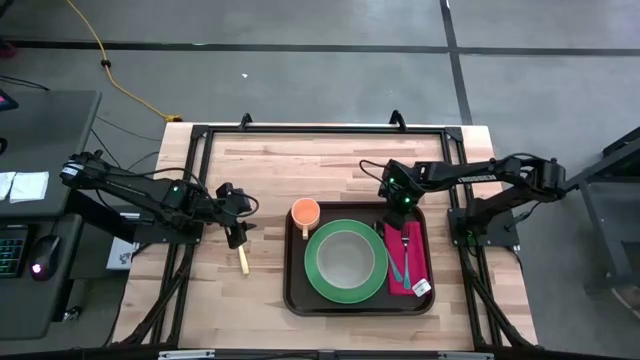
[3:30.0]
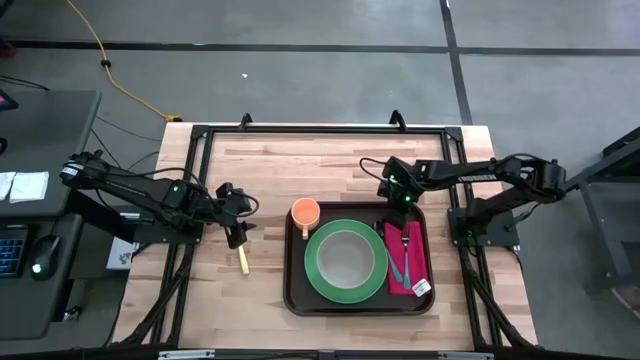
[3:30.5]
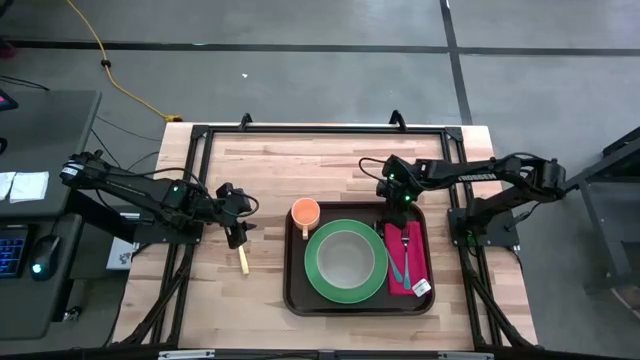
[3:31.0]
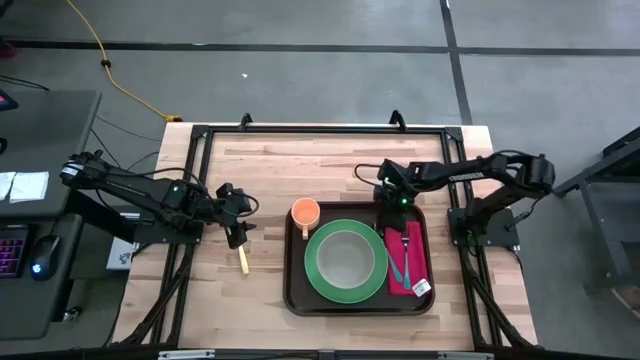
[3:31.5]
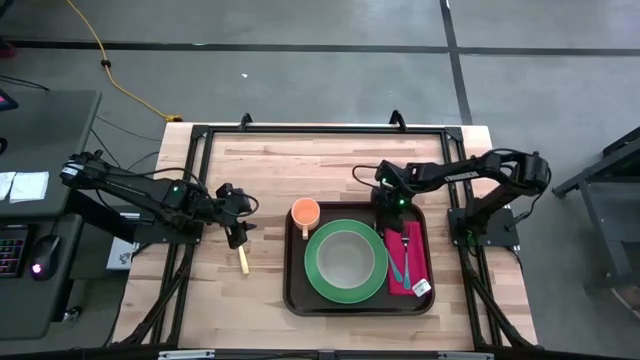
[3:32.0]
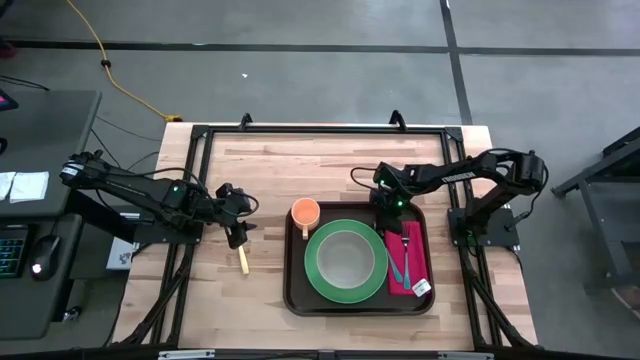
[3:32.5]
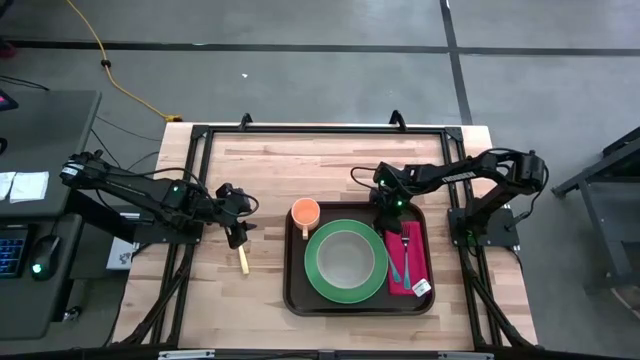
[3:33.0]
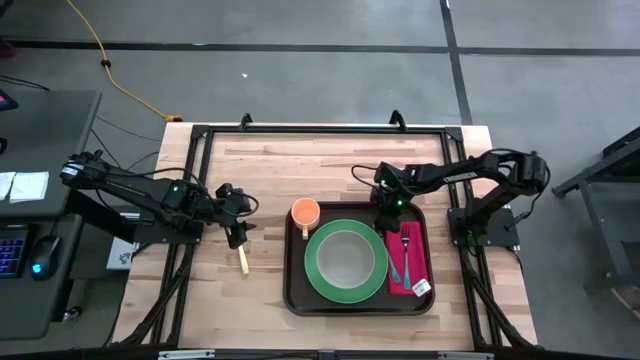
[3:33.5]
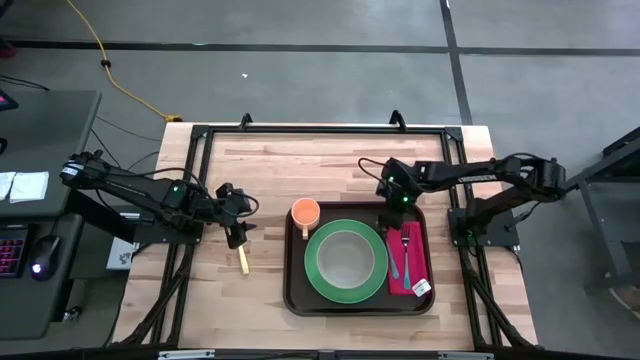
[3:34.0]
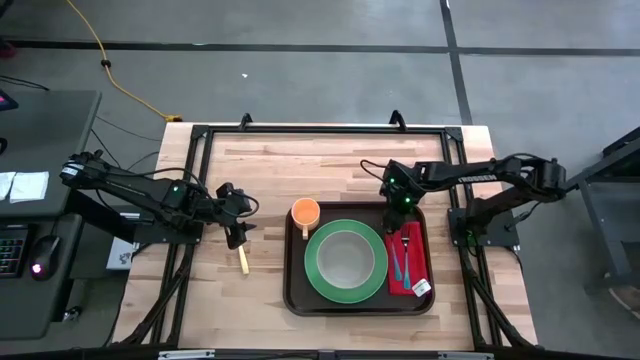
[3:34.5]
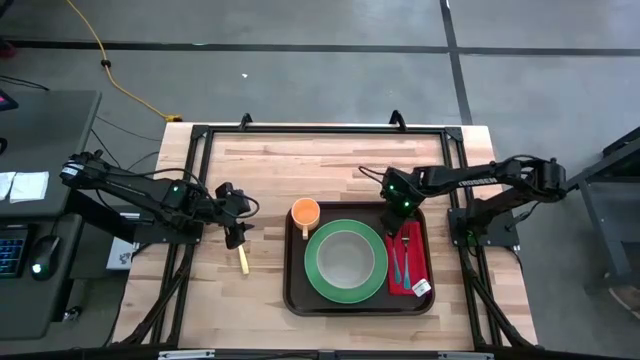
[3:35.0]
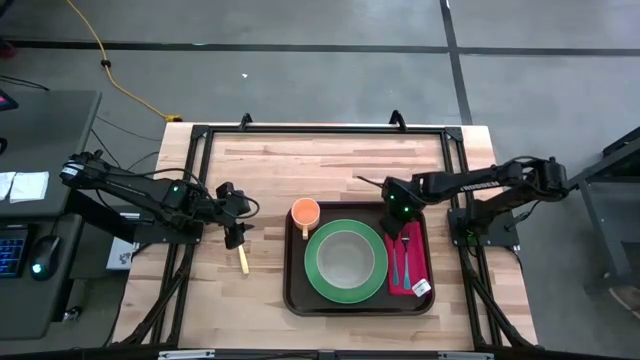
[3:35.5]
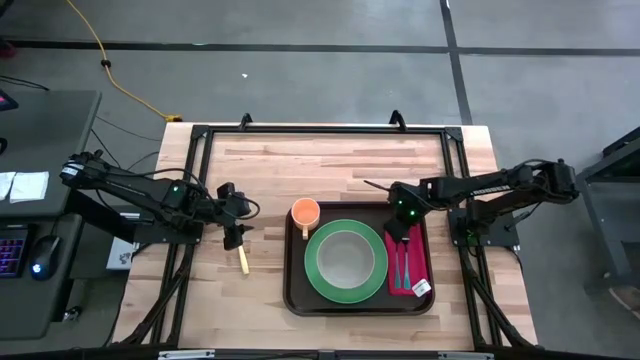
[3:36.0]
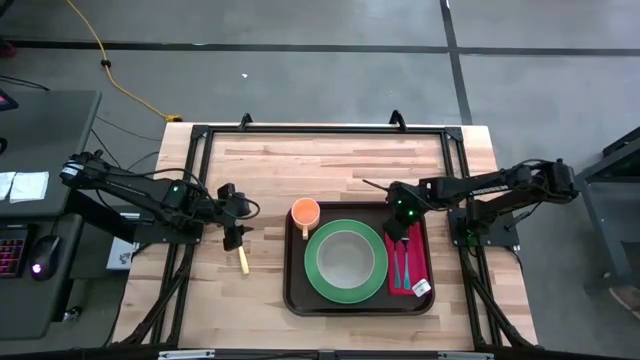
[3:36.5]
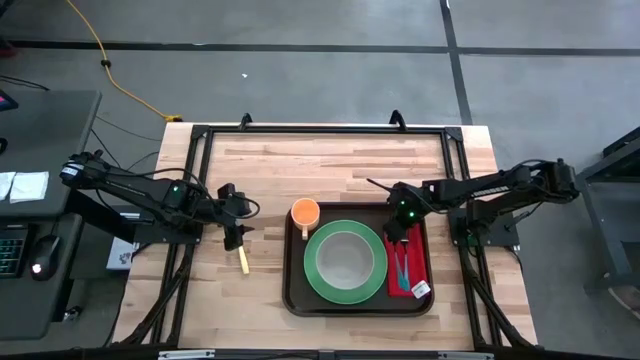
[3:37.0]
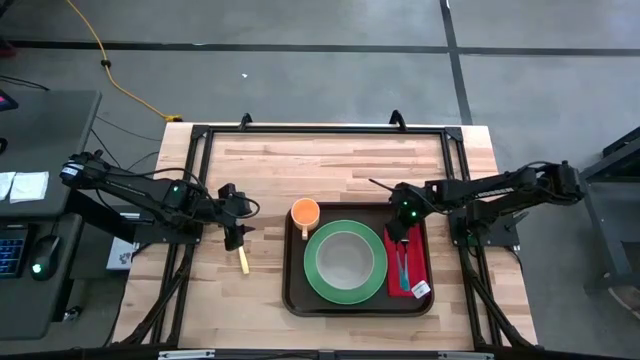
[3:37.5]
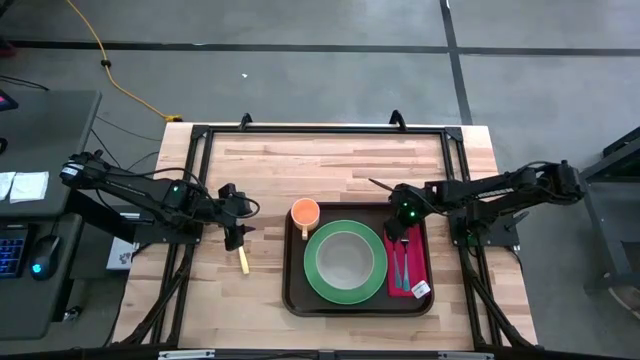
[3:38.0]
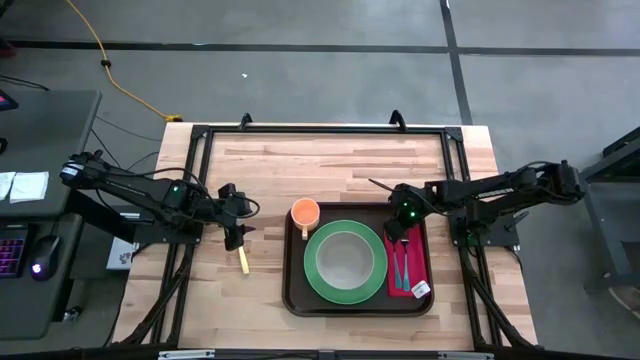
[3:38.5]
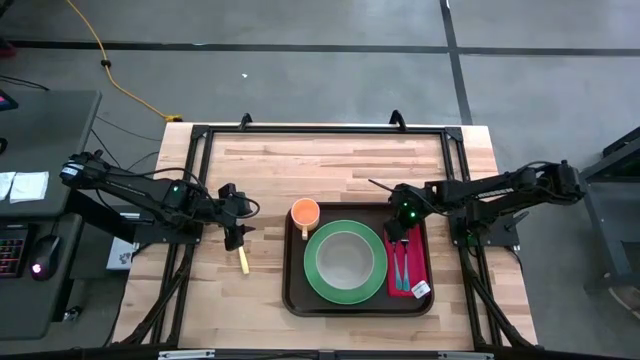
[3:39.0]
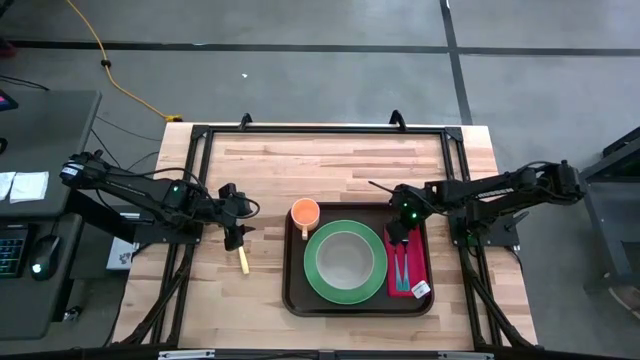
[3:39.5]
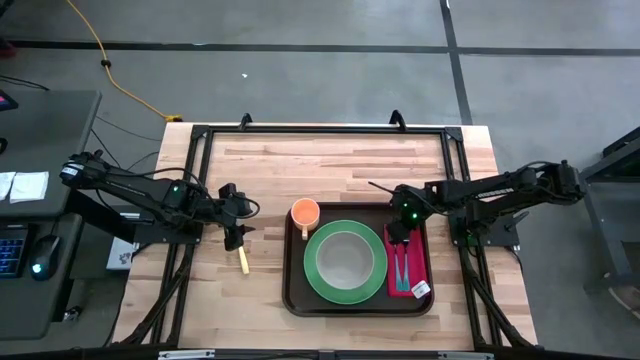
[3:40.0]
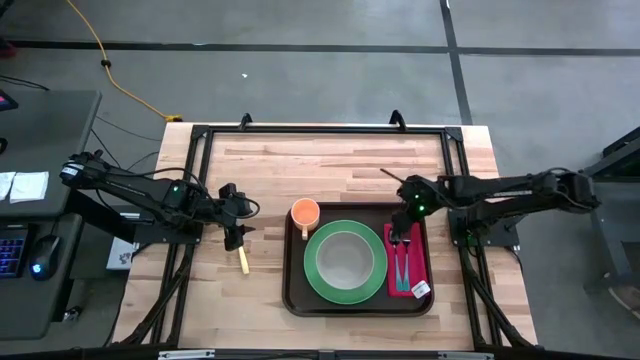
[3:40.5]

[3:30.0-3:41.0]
Task: Set up tray
Put the blue spoon to the left of the blue fork on the red napkin

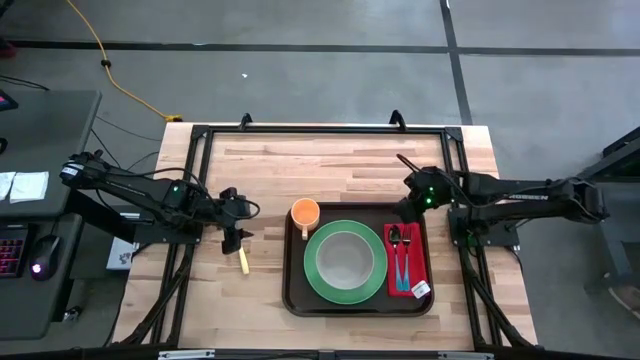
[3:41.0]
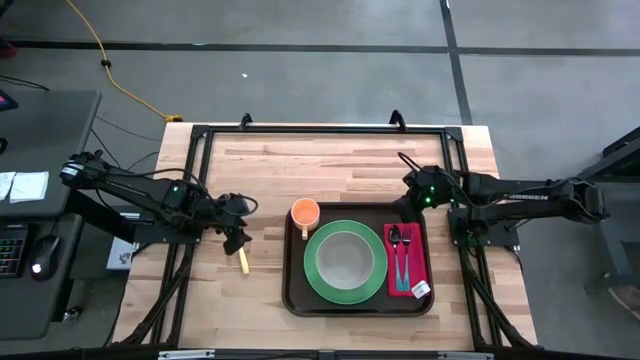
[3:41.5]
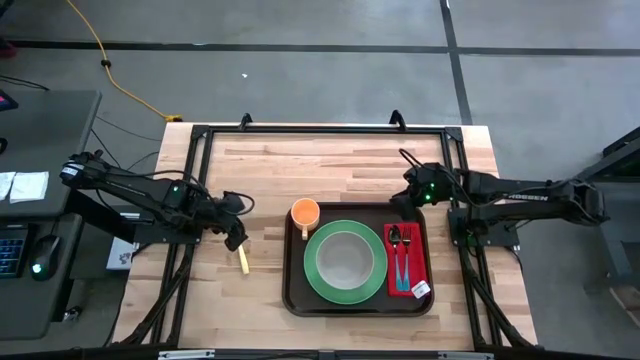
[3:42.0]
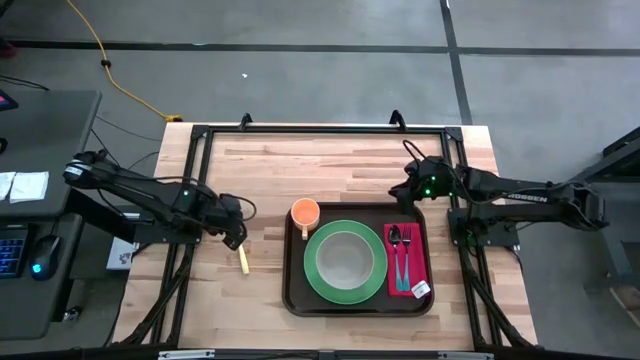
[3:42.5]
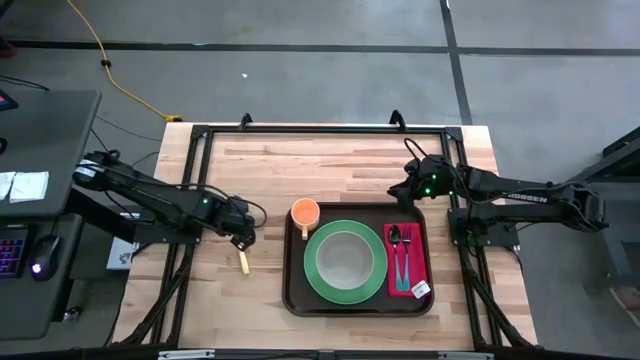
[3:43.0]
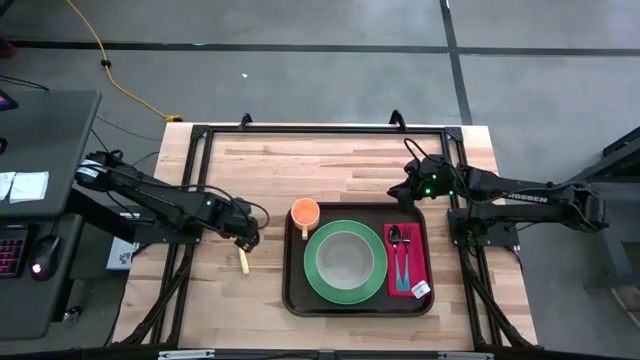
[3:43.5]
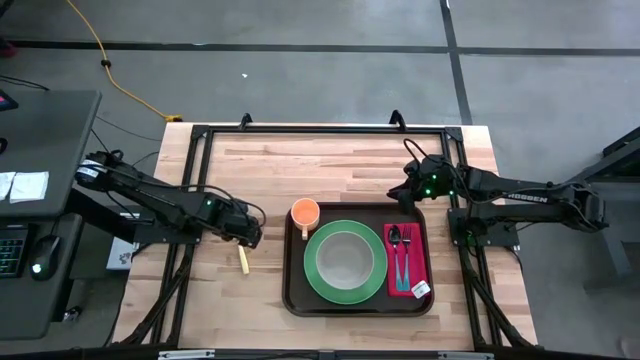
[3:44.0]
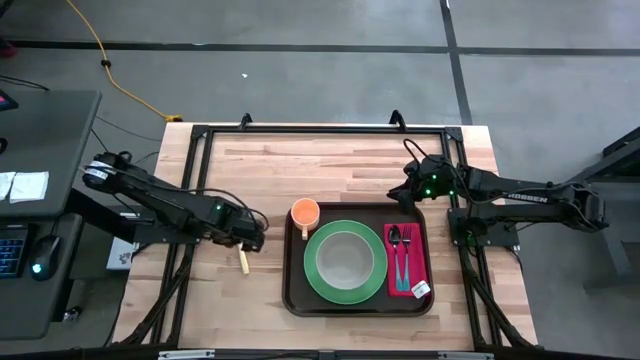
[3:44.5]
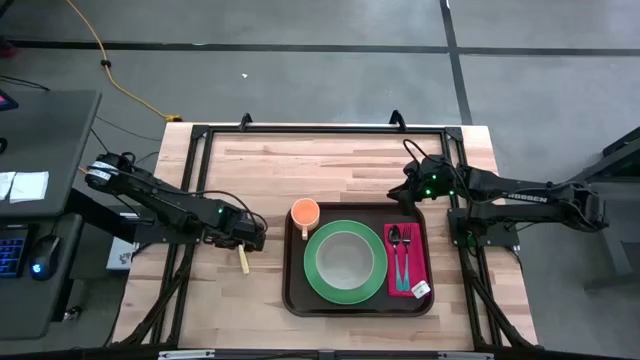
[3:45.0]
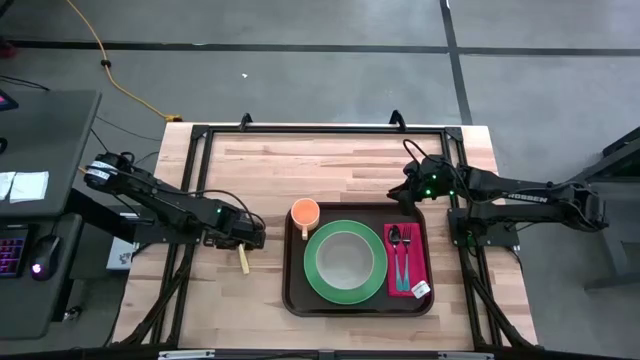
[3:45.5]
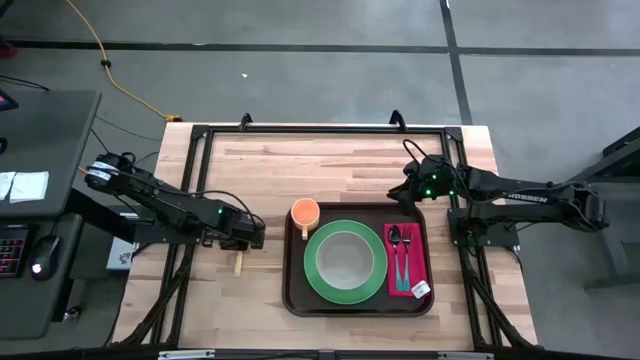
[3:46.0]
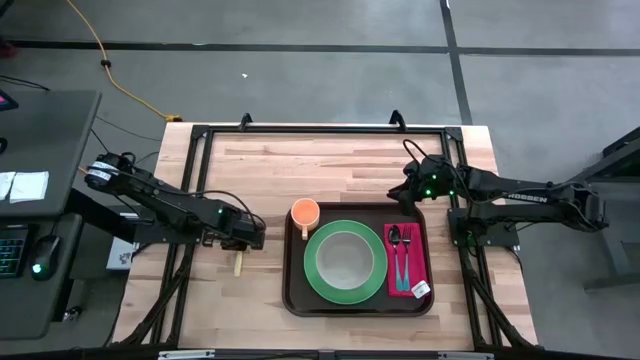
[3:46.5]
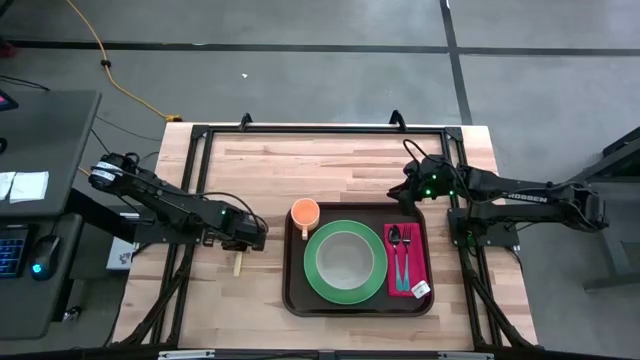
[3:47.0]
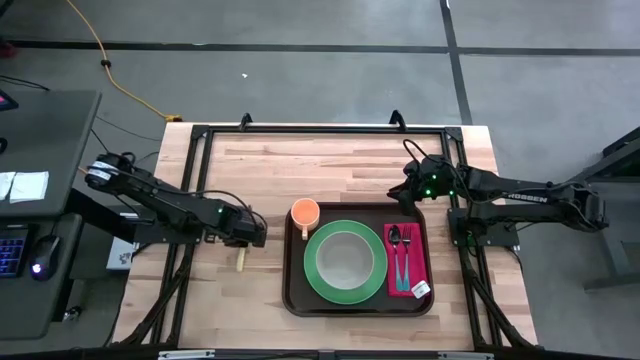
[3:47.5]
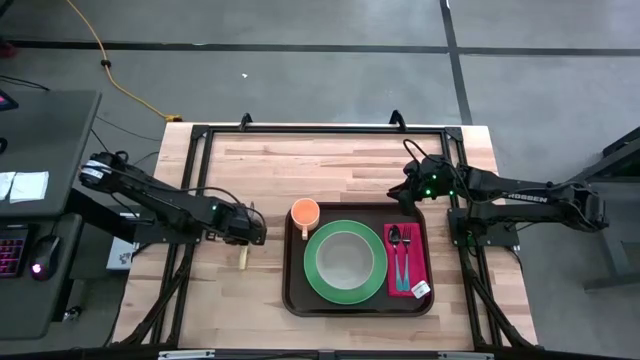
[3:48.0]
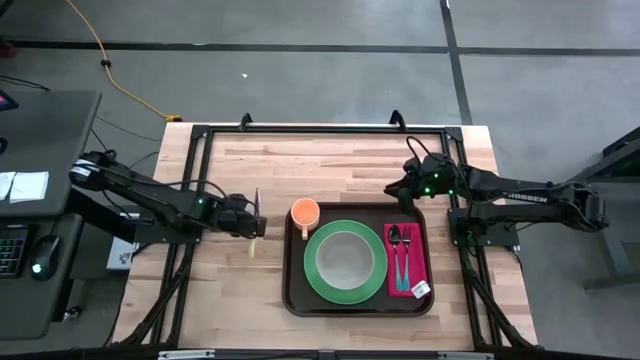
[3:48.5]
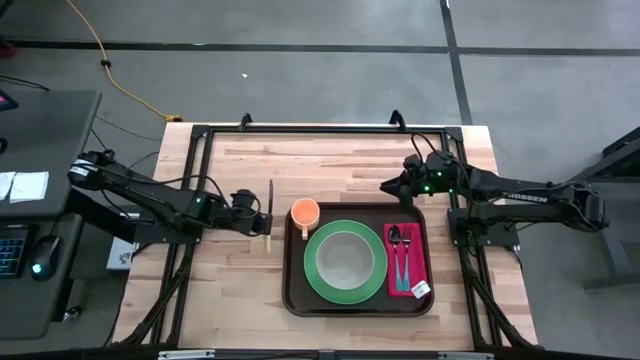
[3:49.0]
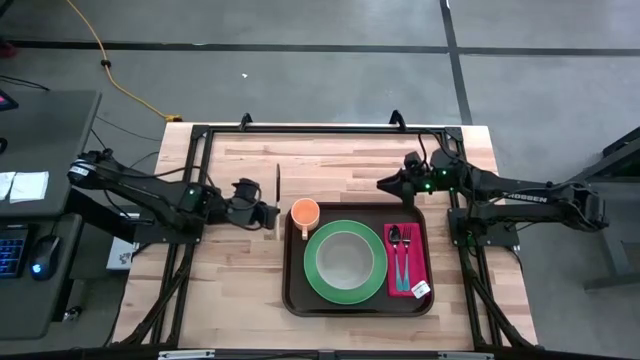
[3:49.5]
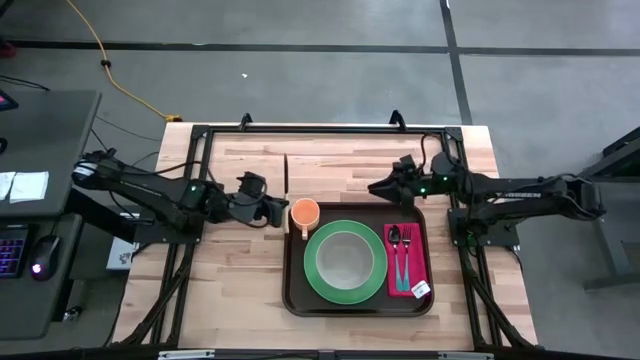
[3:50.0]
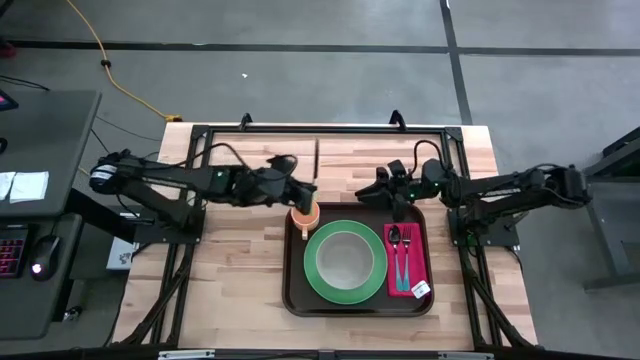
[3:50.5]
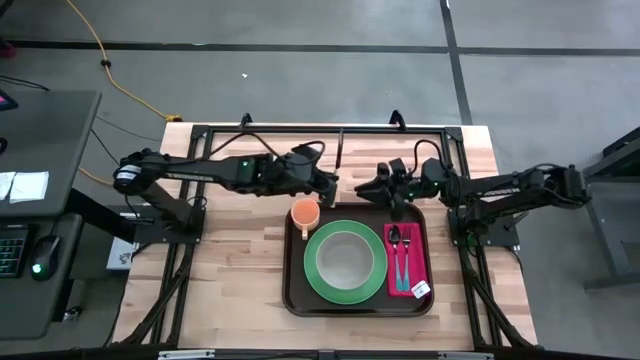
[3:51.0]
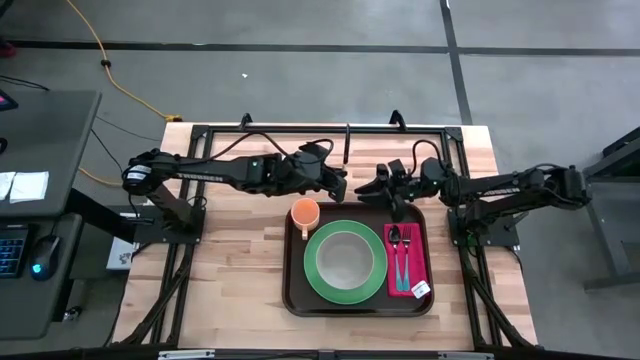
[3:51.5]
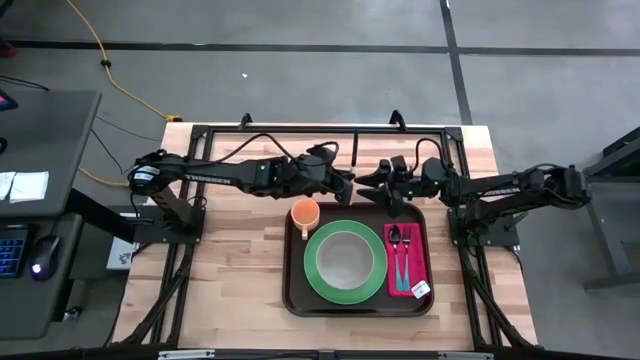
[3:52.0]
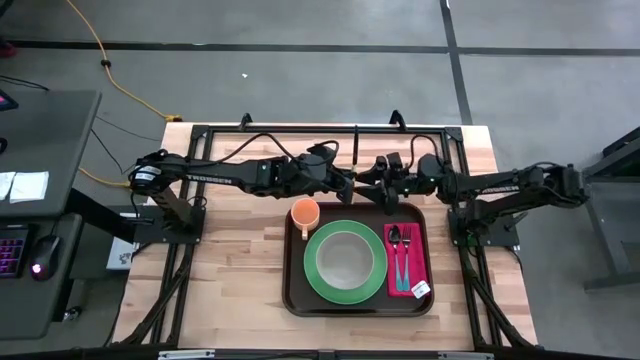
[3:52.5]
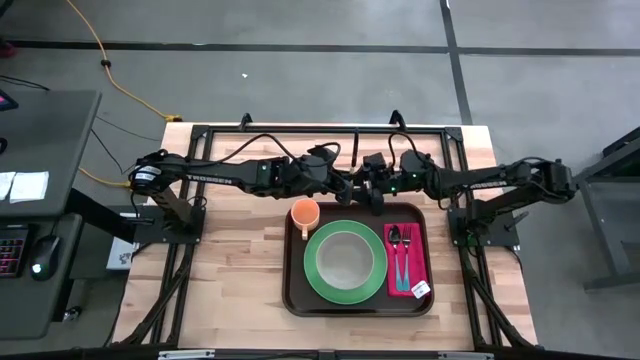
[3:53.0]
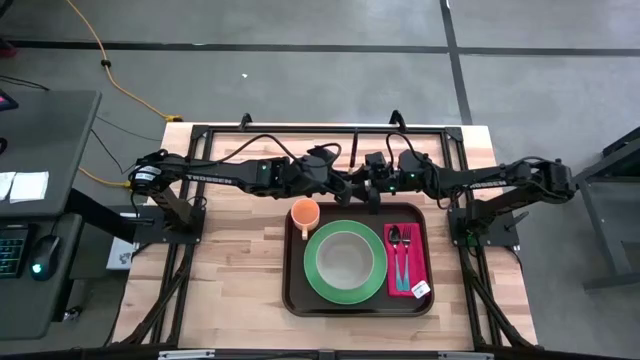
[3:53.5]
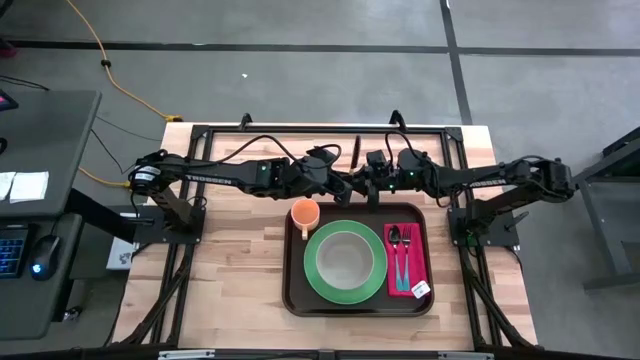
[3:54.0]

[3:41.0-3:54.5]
Put the yellow knife to the right of the blue fork on the red napkin
